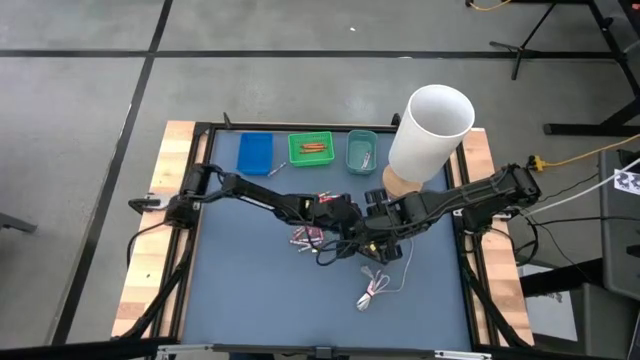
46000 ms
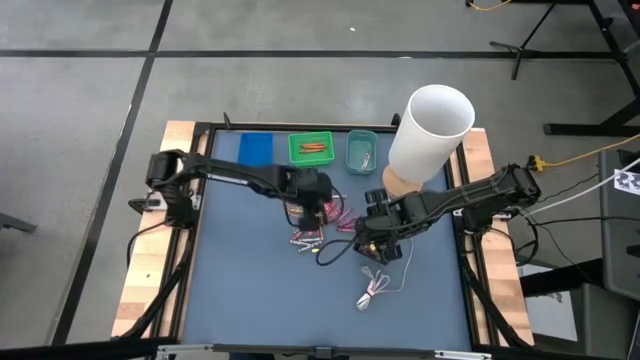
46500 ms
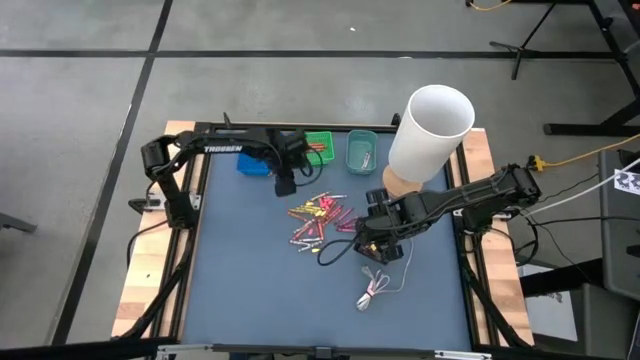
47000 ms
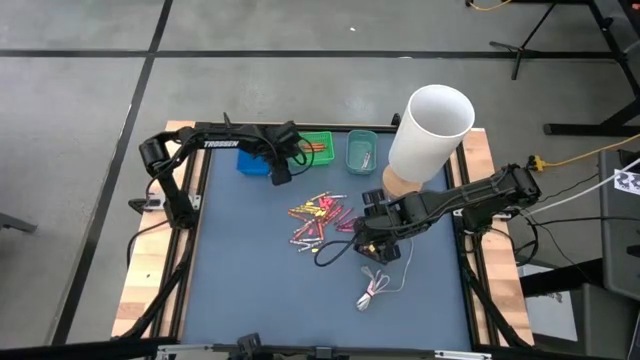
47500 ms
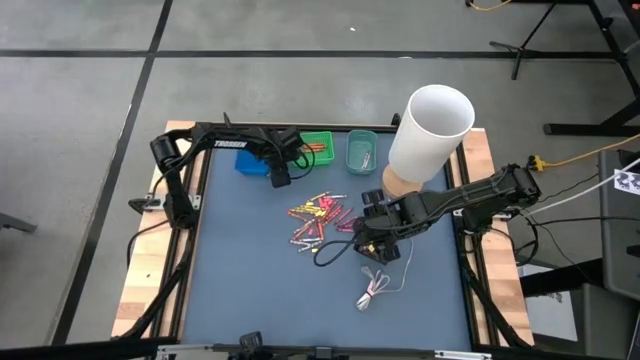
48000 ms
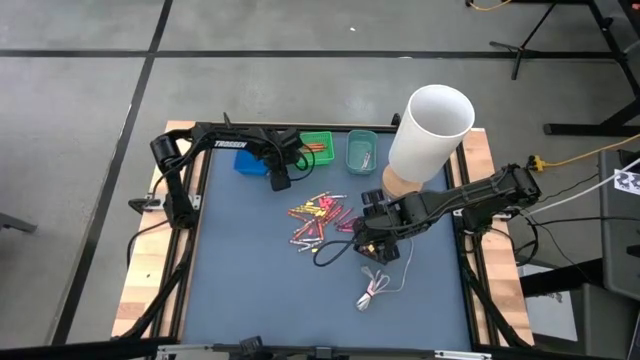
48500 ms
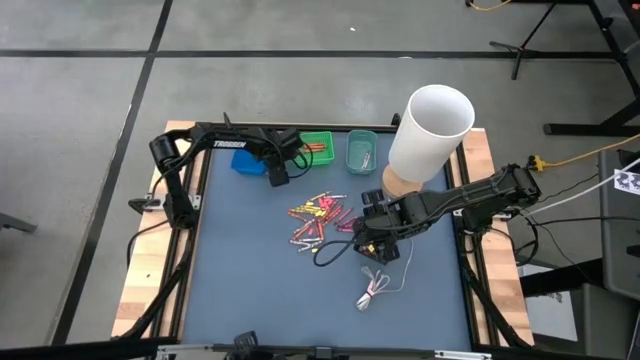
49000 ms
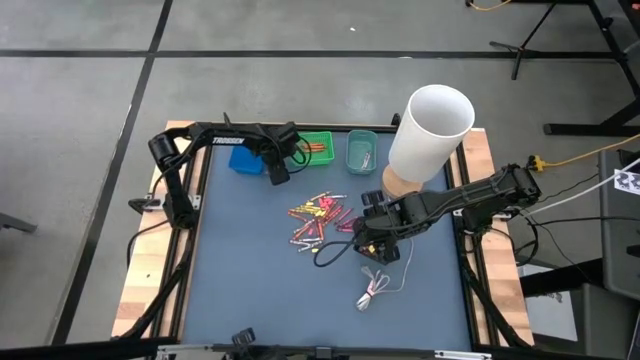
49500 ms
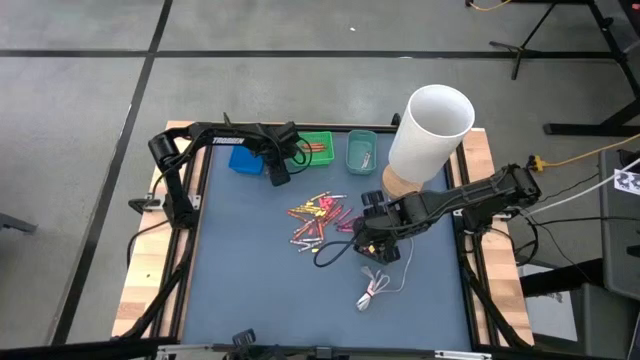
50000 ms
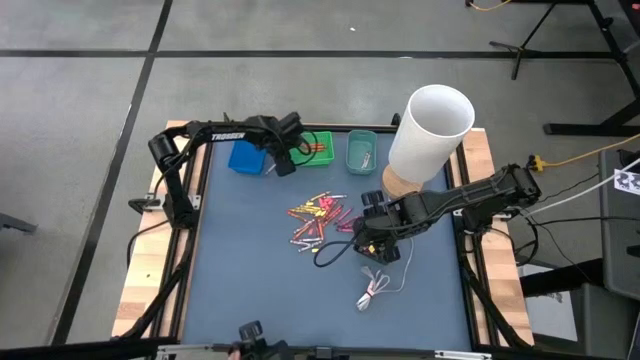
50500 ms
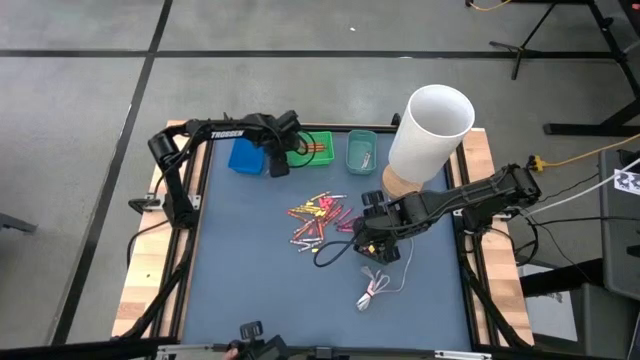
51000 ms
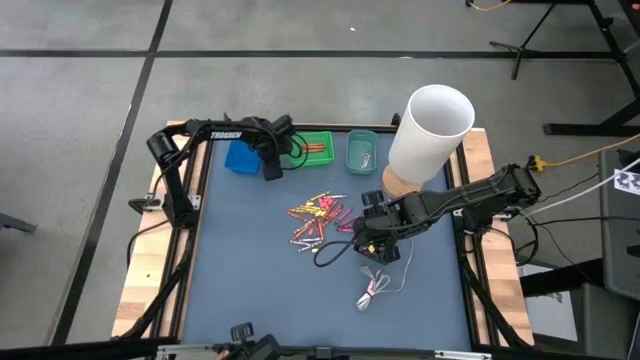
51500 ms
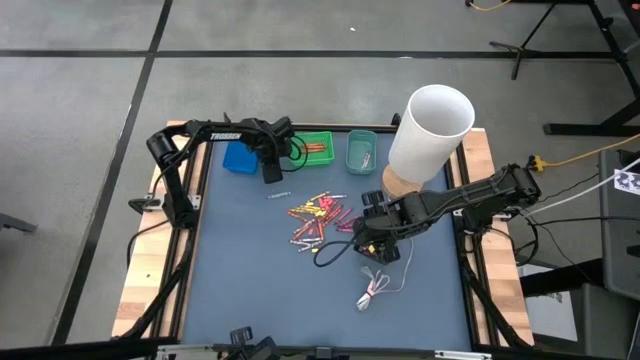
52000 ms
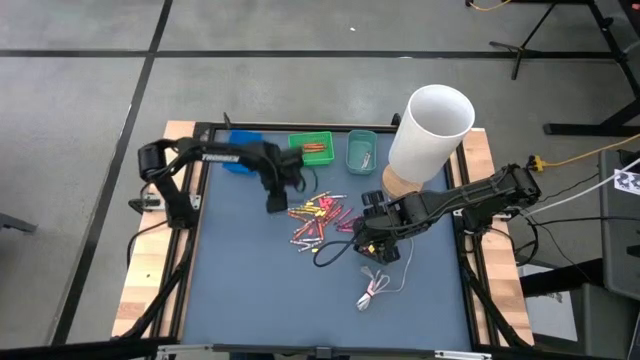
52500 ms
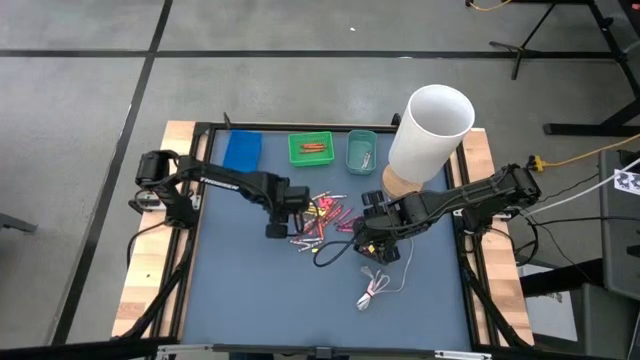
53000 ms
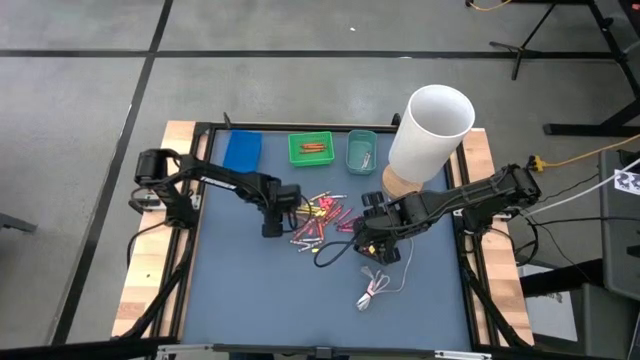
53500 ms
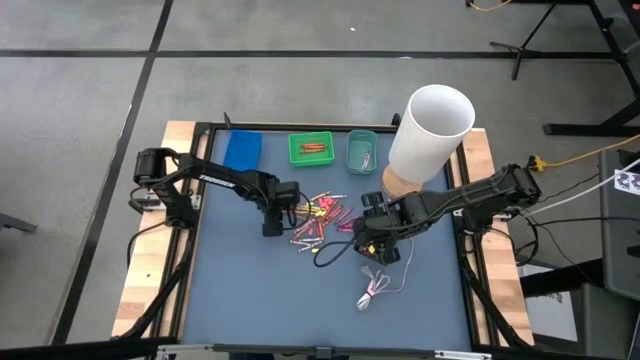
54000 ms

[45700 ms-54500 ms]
Task: Sort crayons
Put the gray crayon into the dark green bin

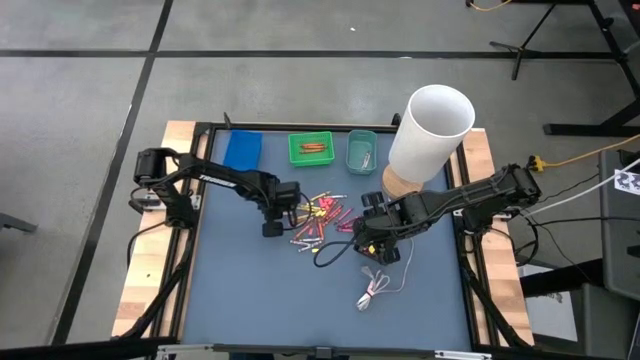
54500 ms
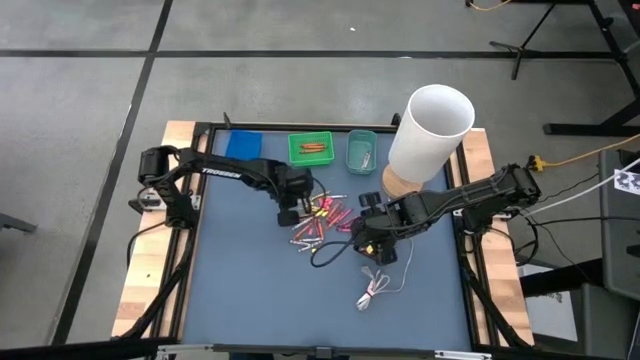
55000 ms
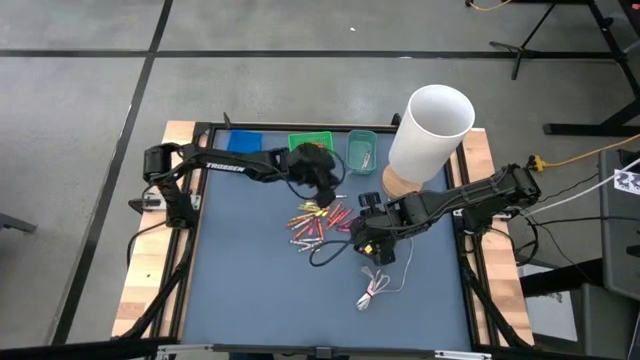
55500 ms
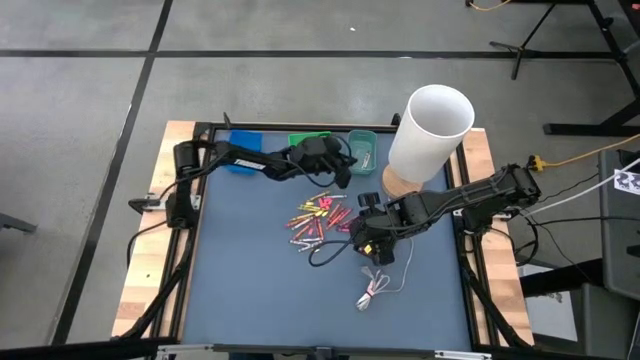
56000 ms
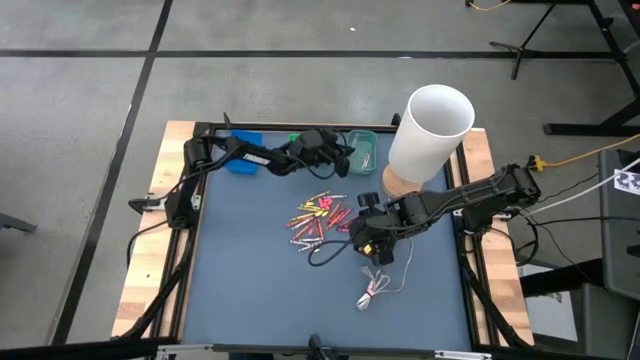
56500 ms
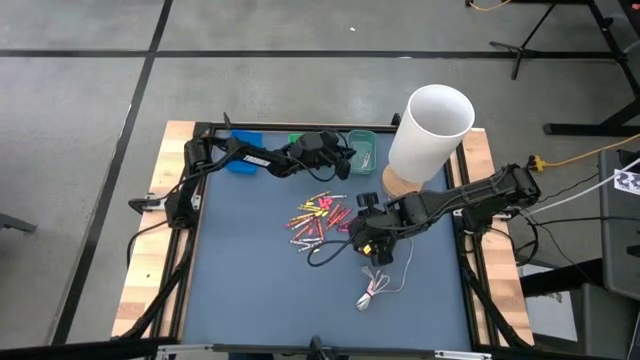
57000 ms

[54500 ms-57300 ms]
Put the gray crayon into the dark green bin

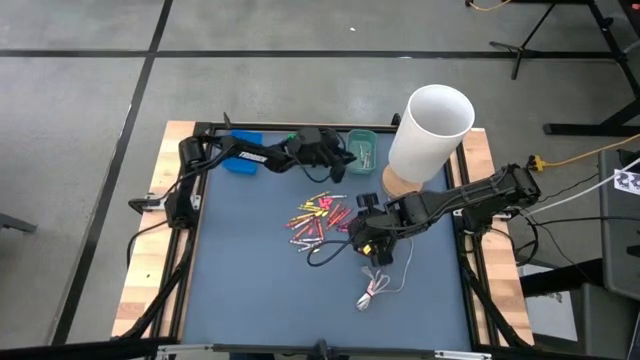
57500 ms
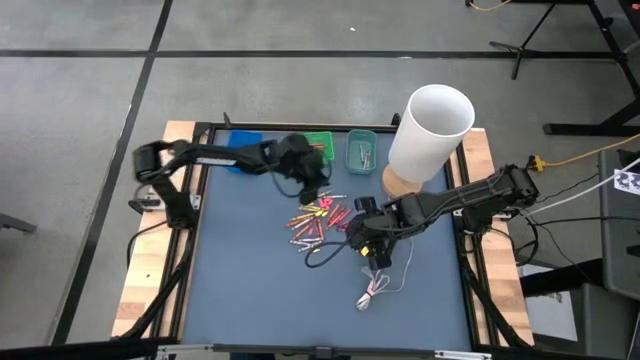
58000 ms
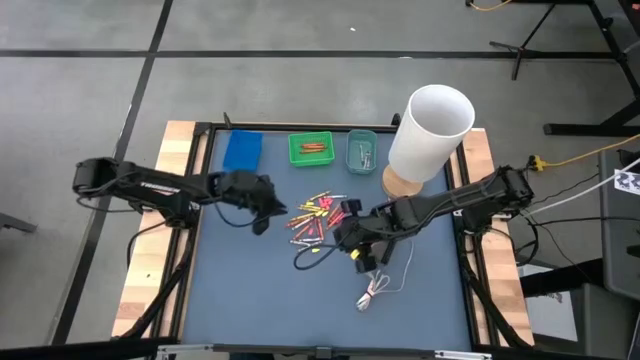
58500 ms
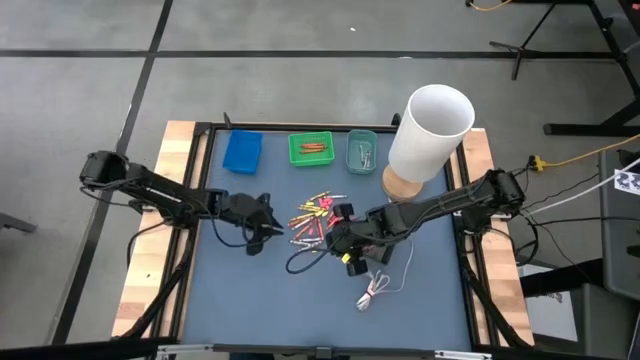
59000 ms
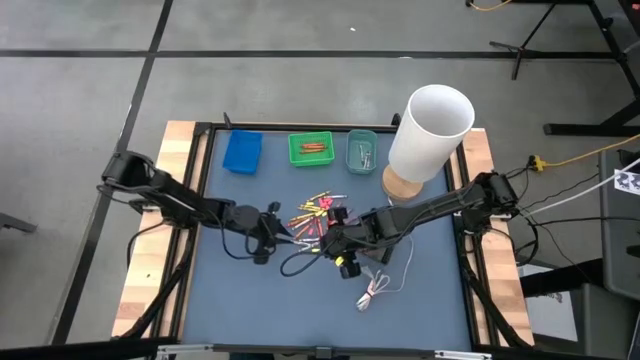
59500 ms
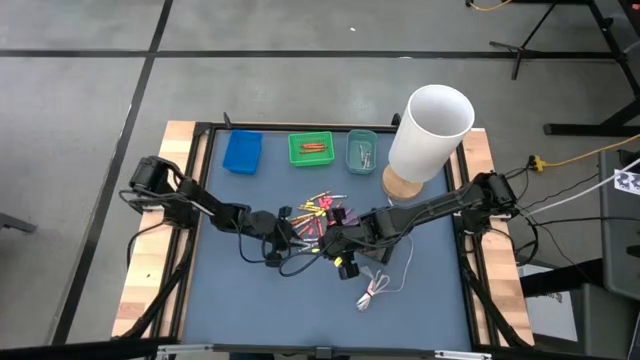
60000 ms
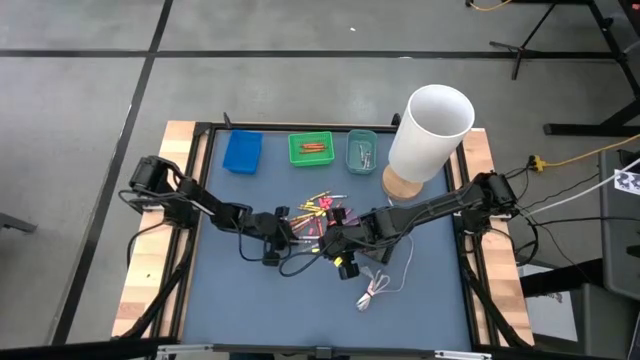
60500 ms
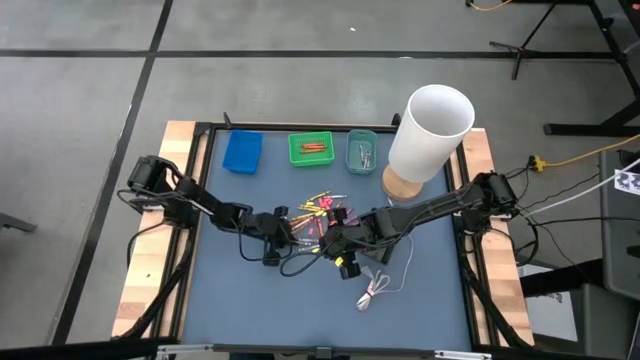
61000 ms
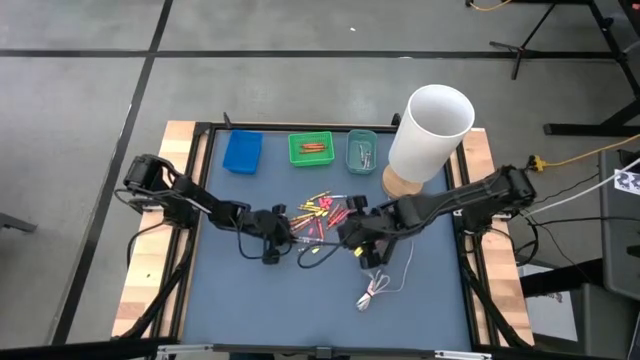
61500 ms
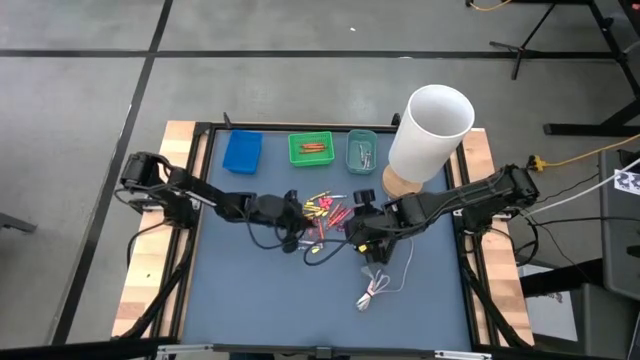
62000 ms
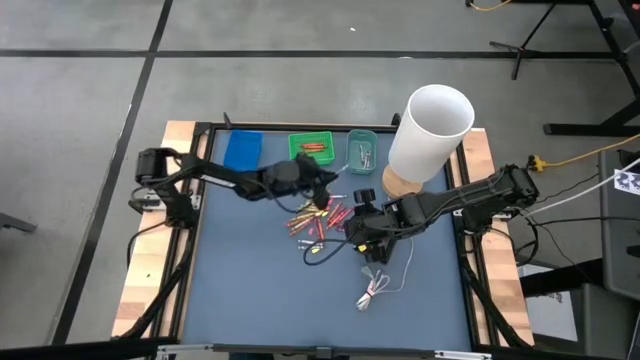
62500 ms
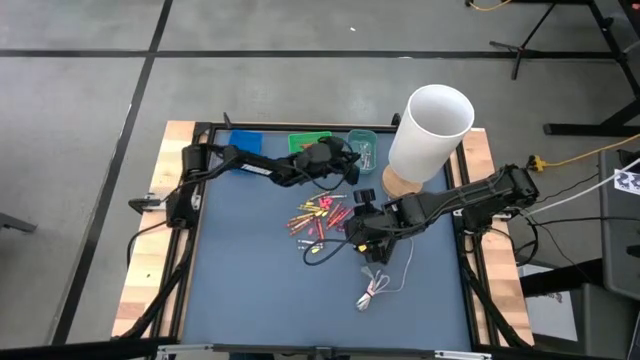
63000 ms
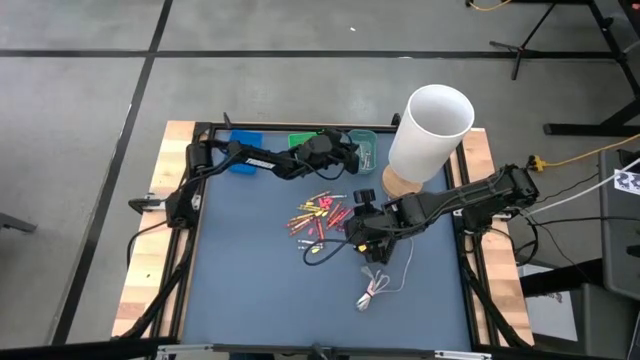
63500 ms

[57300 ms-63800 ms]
Put the gray crayon into the dark green bin
